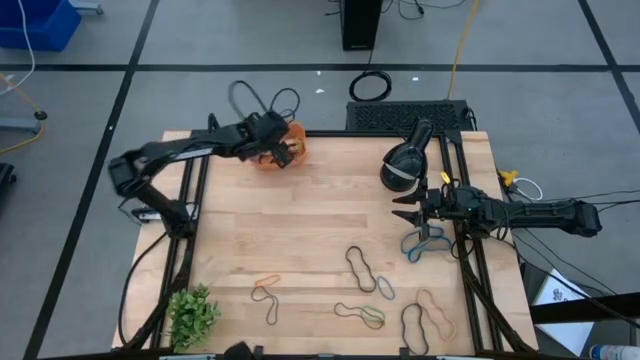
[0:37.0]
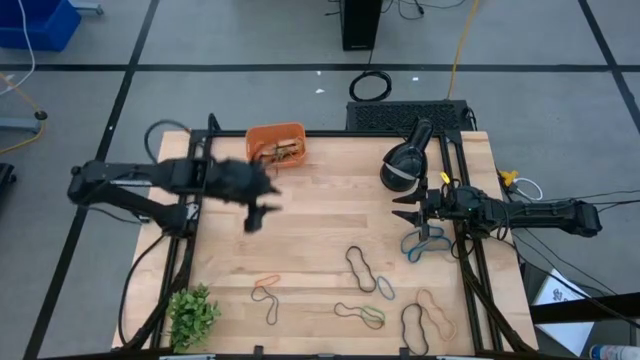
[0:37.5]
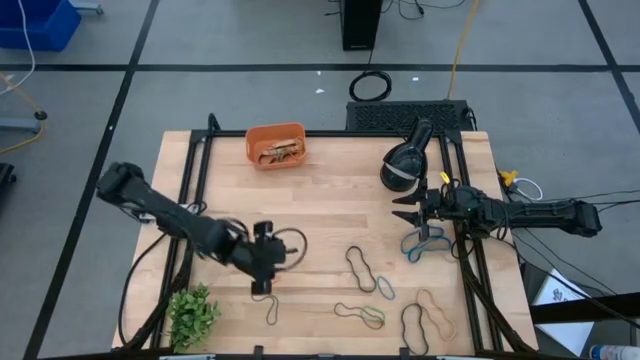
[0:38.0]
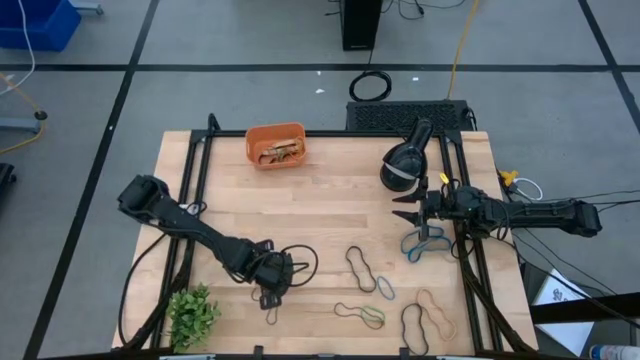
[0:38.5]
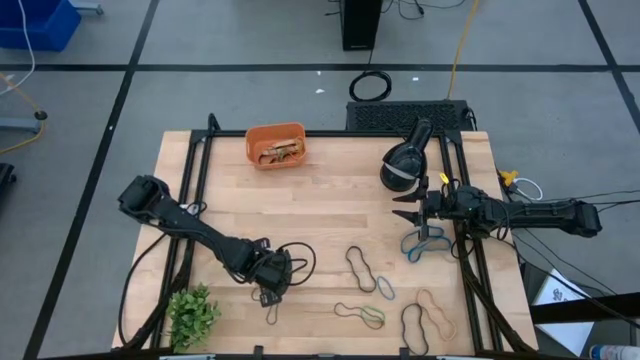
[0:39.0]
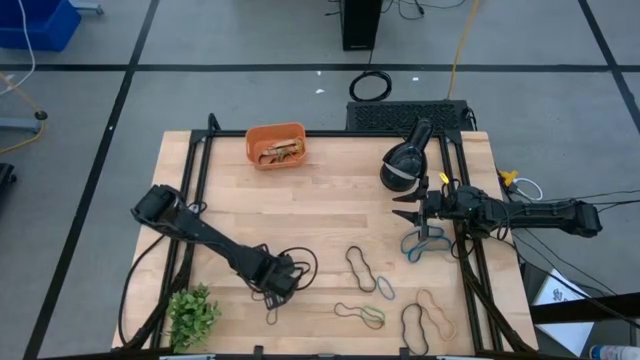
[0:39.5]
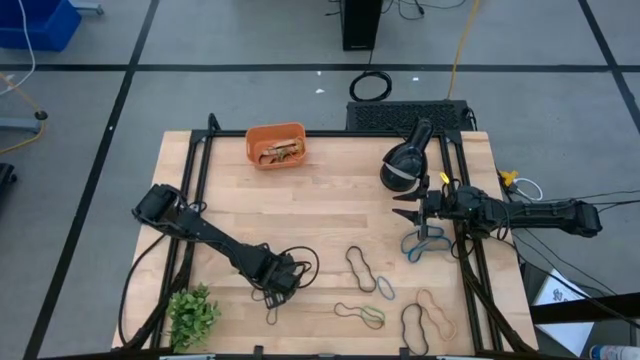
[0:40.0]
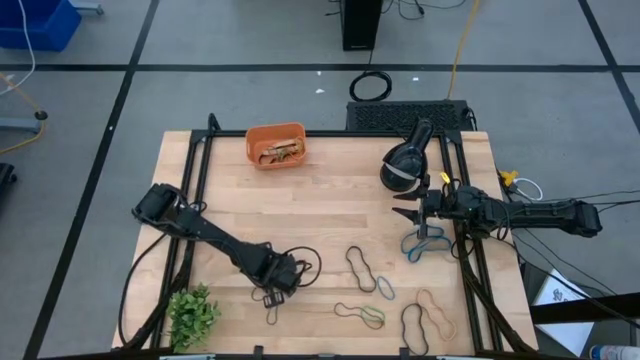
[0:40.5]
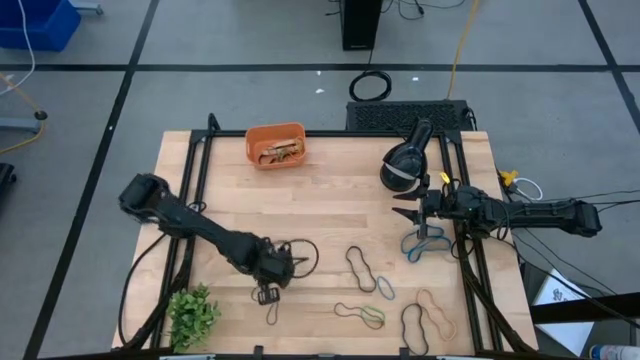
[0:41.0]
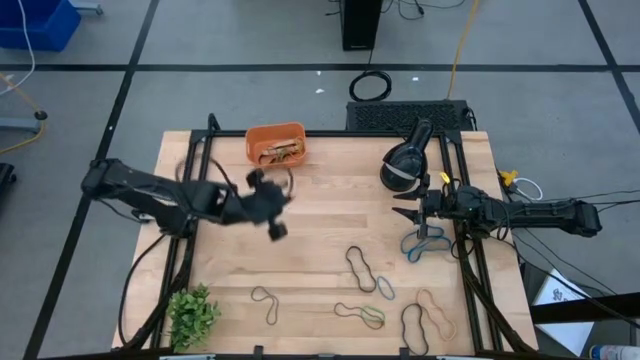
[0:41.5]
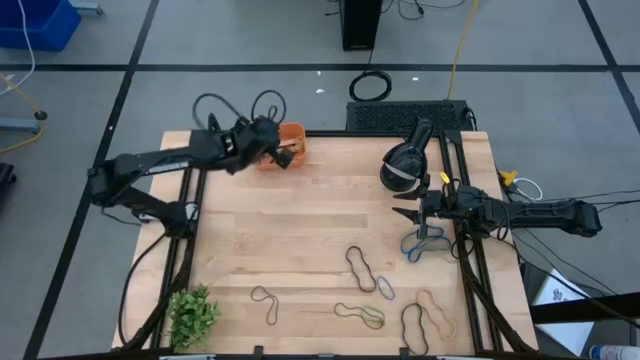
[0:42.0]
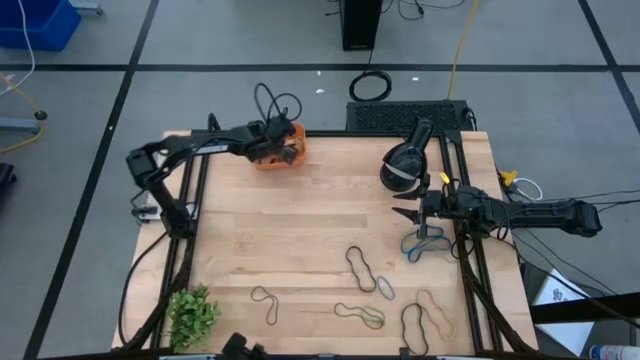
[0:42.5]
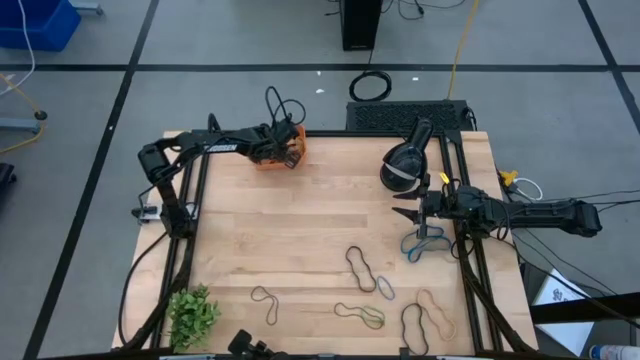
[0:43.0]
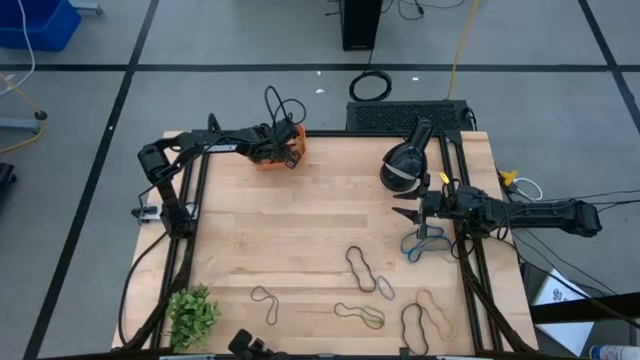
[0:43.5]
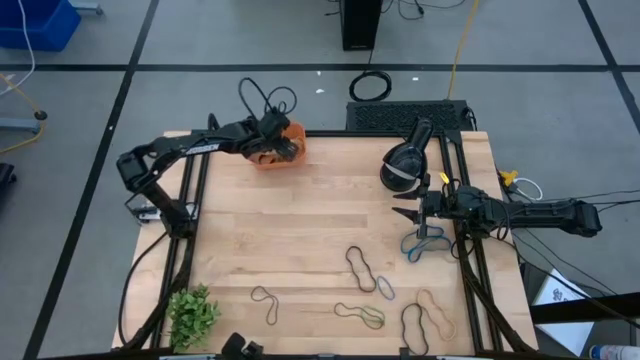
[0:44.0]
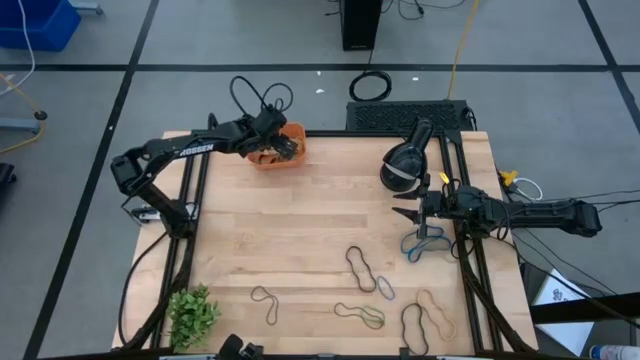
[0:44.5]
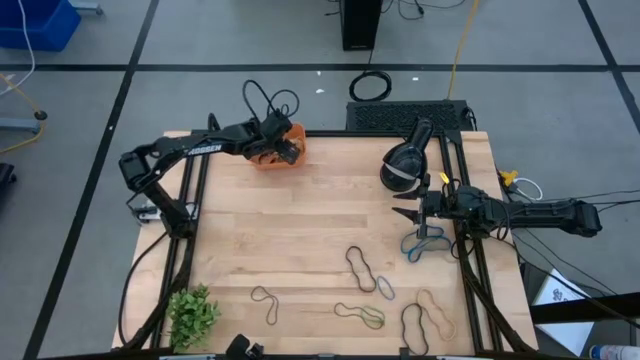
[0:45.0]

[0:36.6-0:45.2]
Task: Pick and place rubber bands into bin
Put the orange rubber band into the orange container

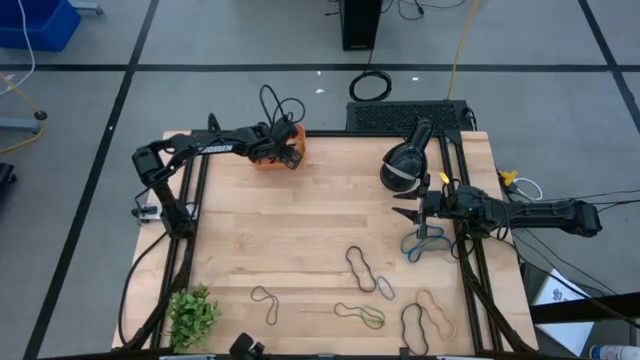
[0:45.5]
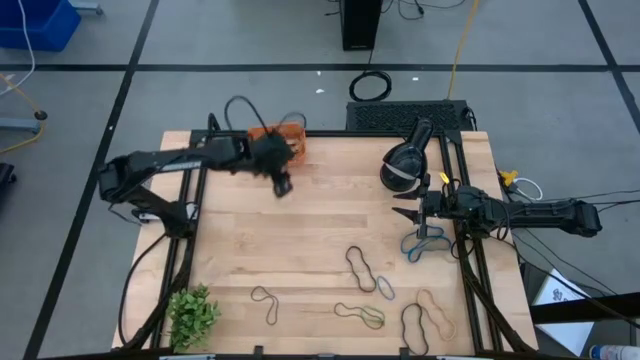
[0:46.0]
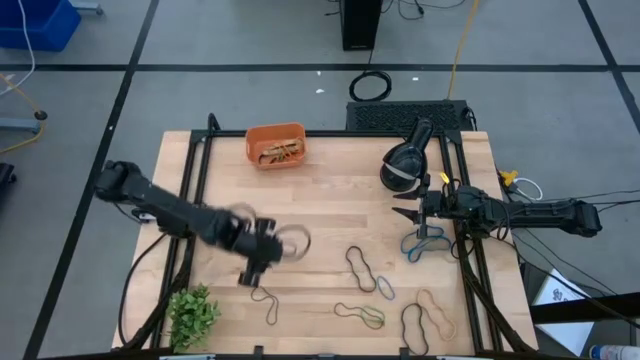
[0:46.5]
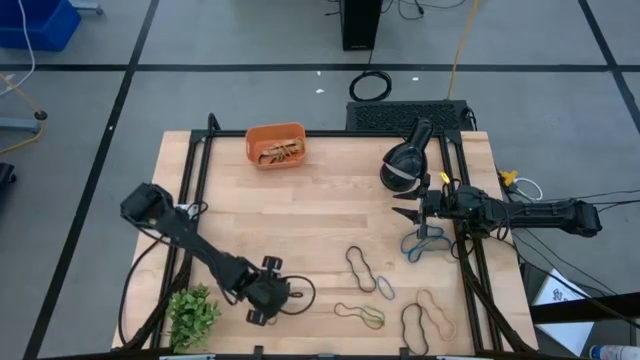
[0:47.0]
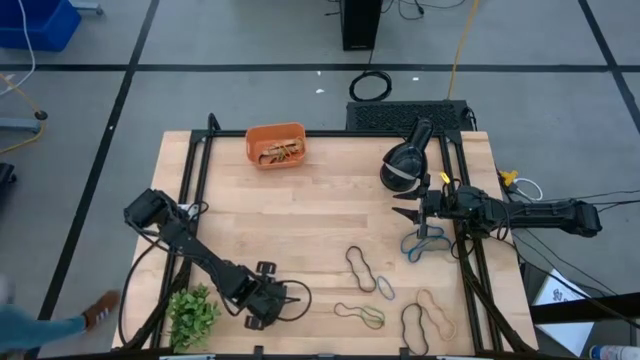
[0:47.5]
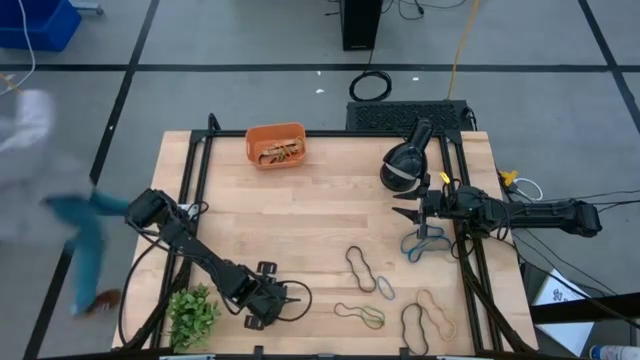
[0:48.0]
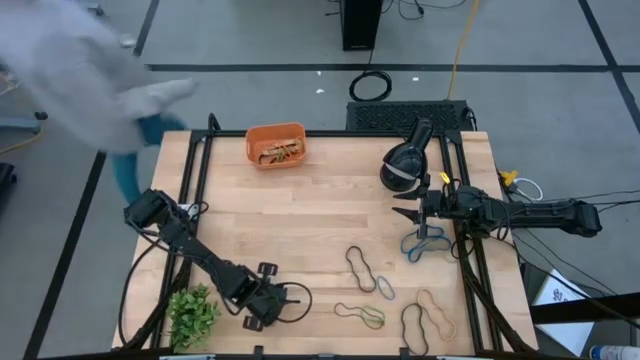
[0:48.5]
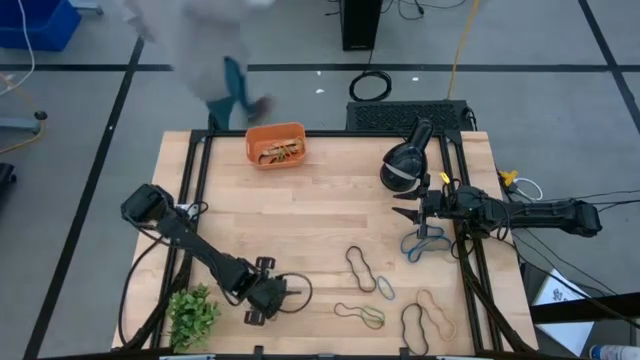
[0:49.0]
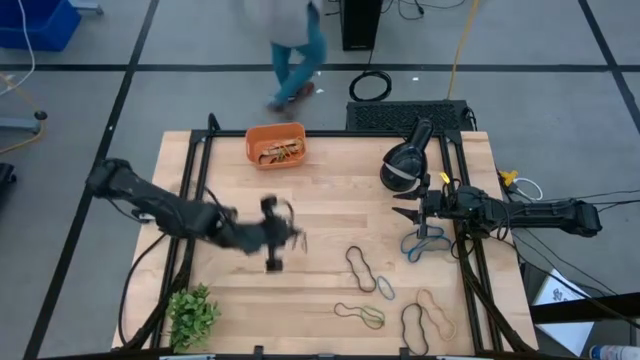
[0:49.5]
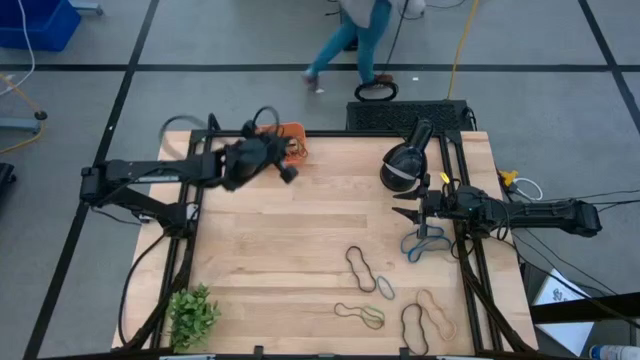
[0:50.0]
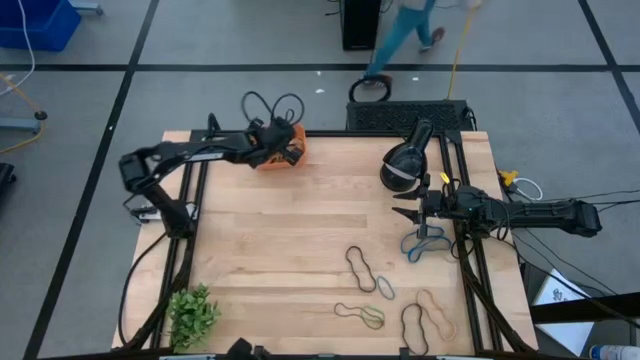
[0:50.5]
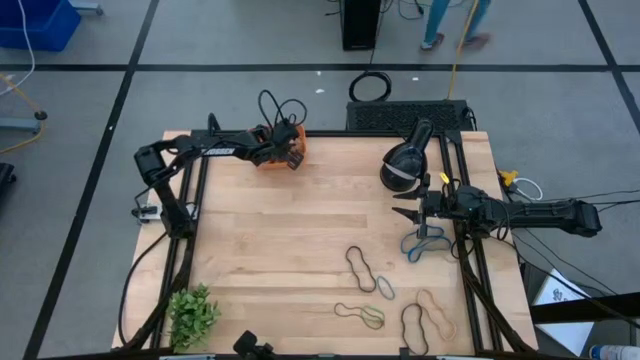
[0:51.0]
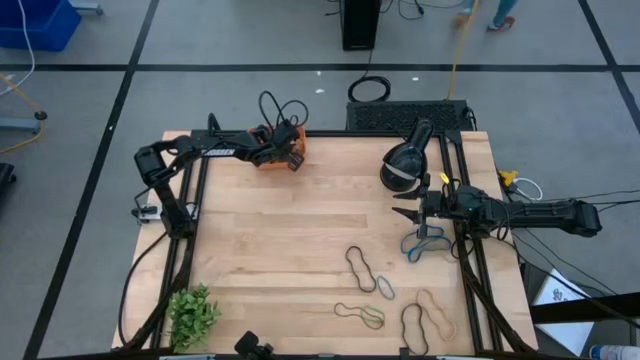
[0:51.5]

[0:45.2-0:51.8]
Put the left purple rubber band into the orange container

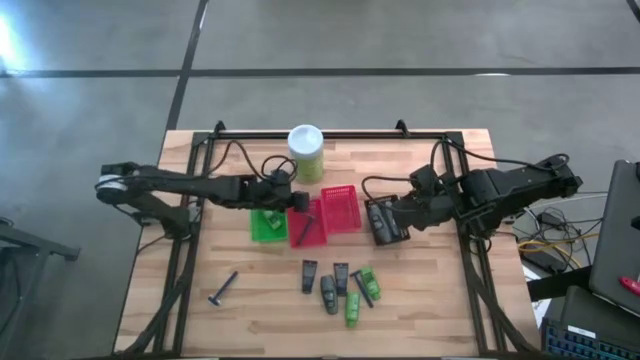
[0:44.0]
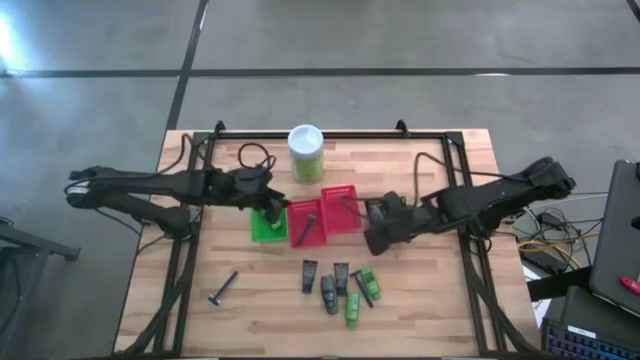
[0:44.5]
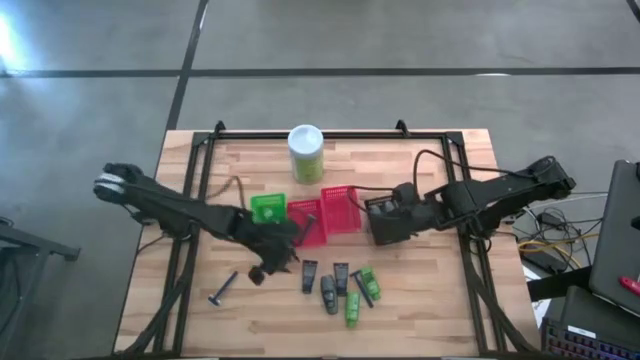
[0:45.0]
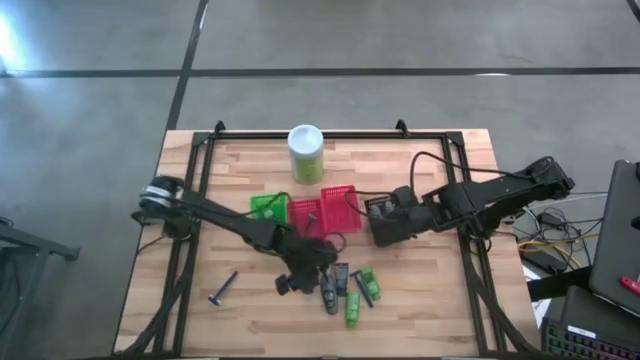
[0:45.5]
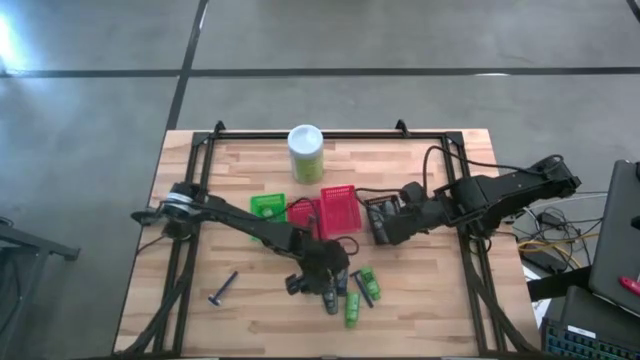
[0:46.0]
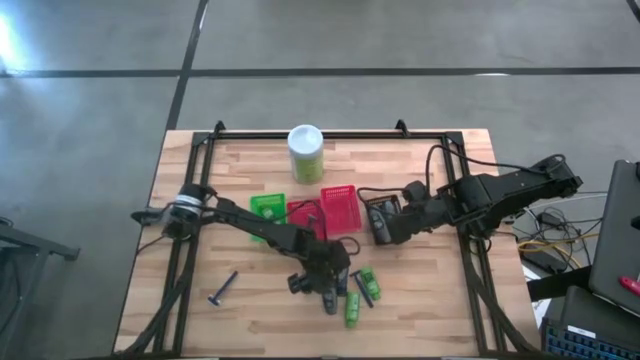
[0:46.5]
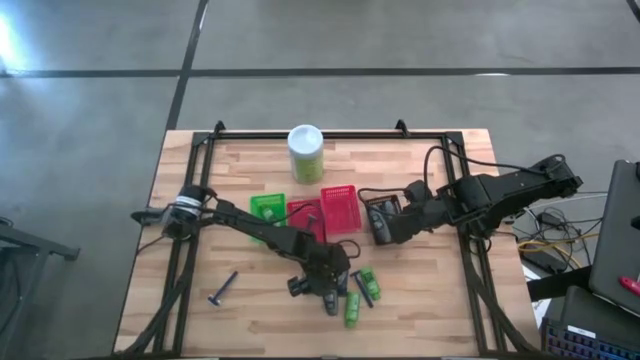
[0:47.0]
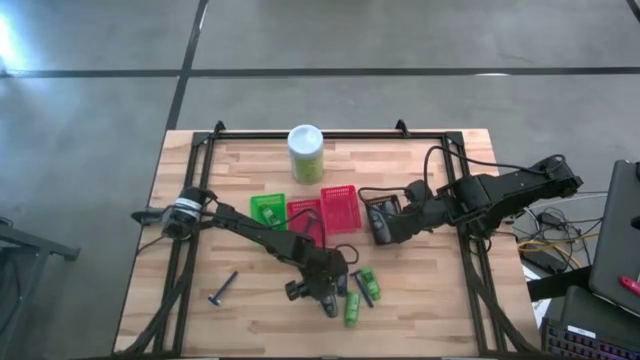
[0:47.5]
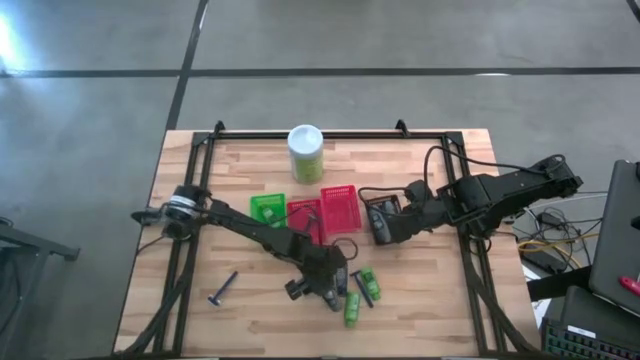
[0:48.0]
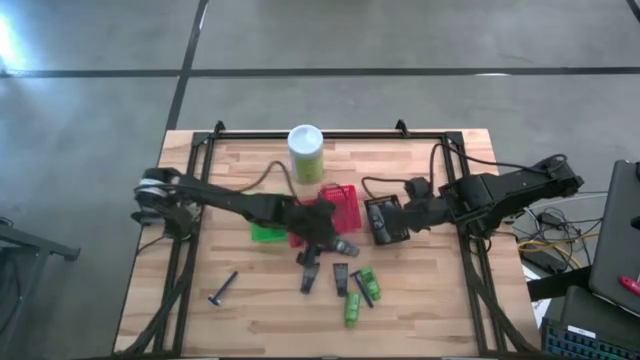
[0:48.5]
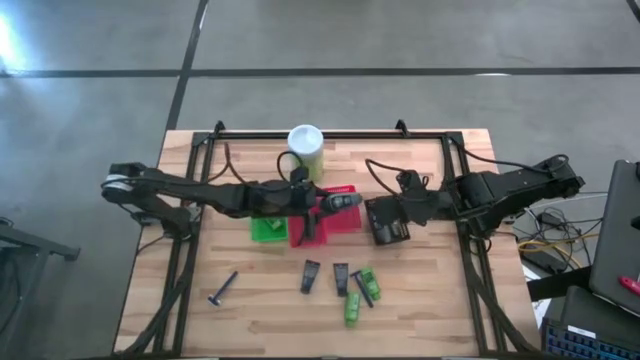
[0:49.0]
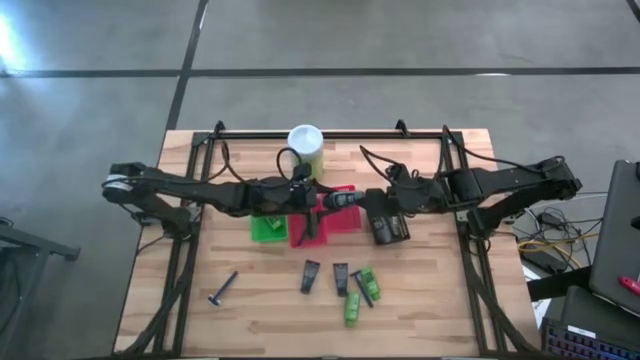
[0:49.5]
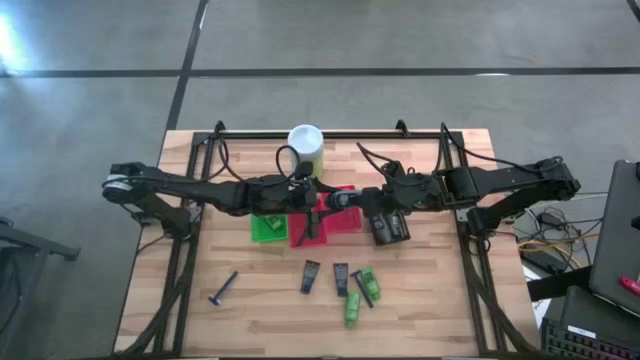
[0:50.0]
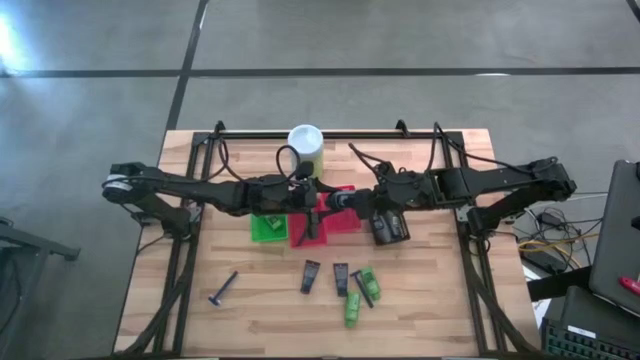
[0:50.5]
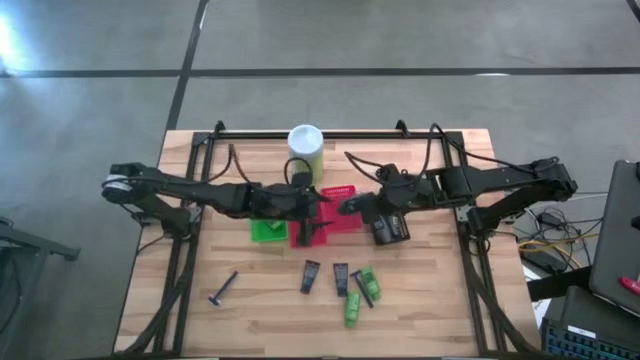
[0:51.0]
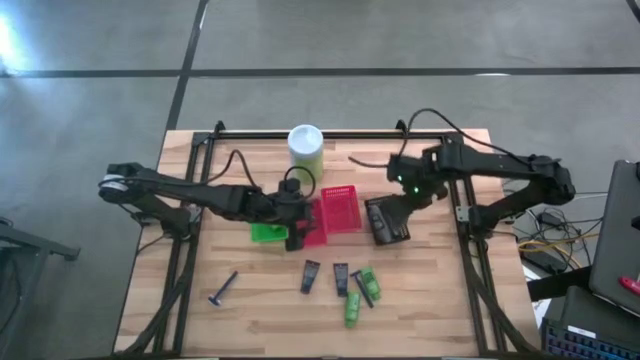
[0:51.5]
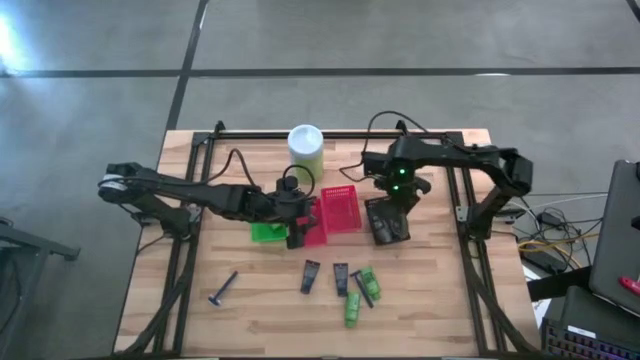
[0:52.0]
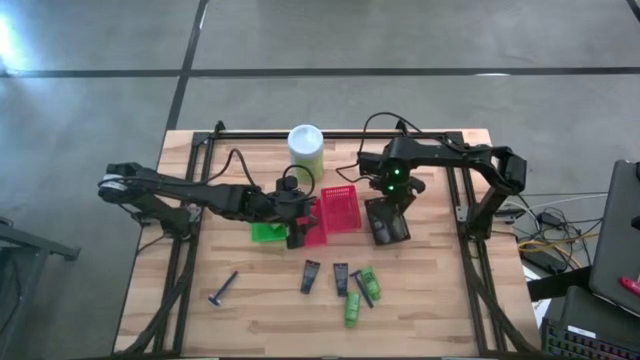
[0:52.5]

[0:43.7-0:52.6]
Task: Pick & Place Travel size toiletries
Put the black deodorant into the black bin
